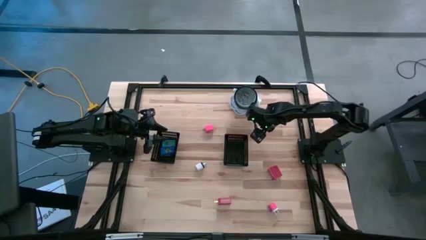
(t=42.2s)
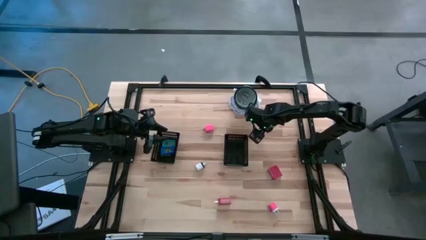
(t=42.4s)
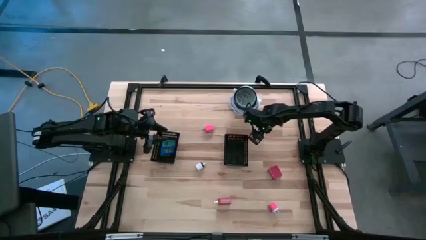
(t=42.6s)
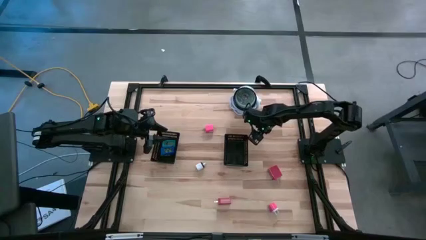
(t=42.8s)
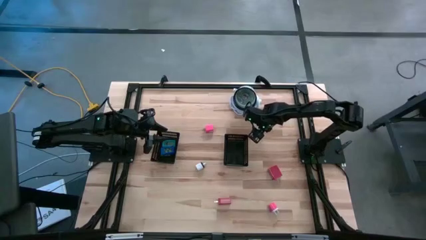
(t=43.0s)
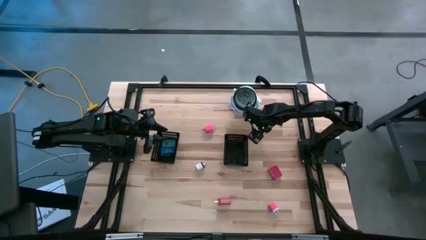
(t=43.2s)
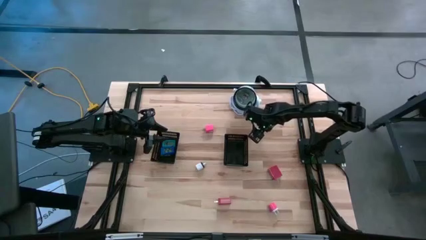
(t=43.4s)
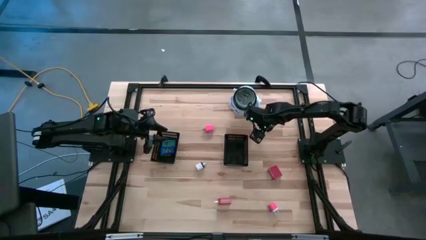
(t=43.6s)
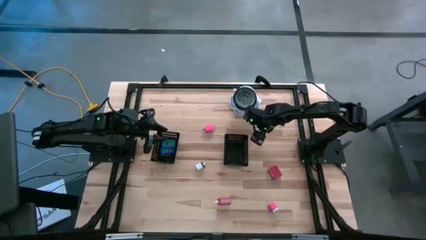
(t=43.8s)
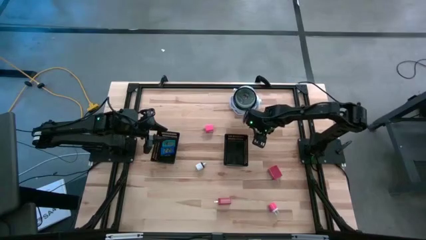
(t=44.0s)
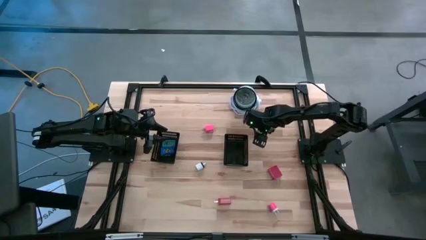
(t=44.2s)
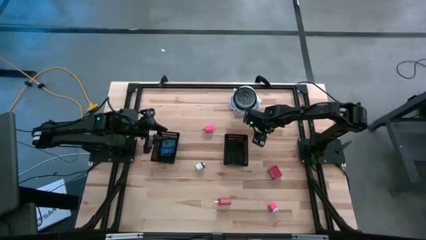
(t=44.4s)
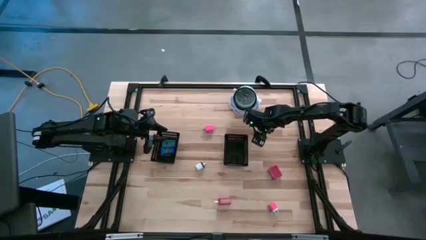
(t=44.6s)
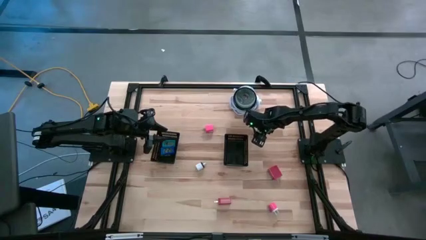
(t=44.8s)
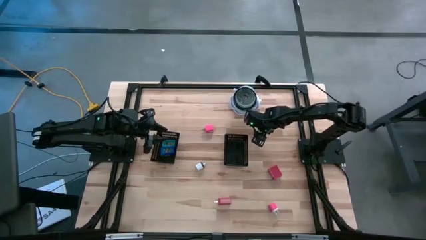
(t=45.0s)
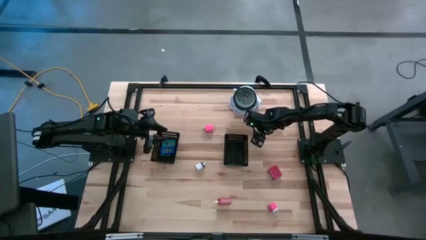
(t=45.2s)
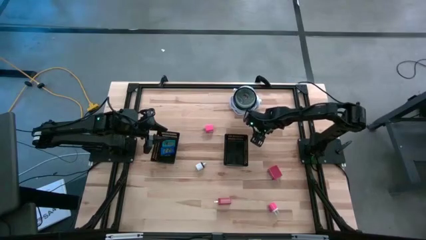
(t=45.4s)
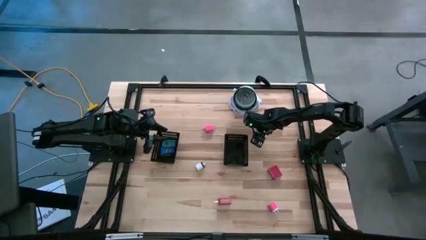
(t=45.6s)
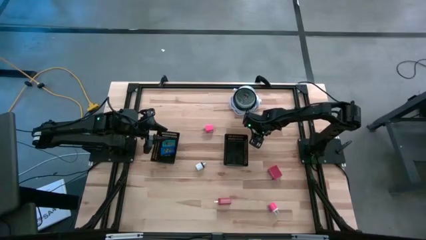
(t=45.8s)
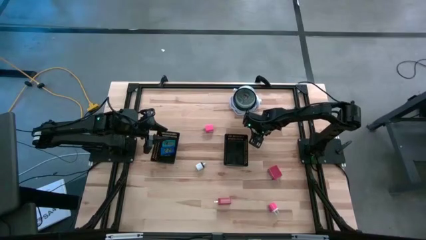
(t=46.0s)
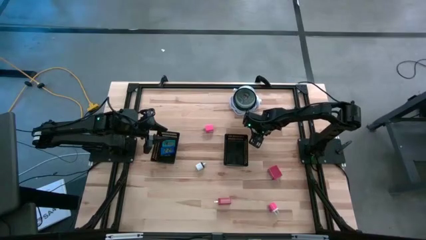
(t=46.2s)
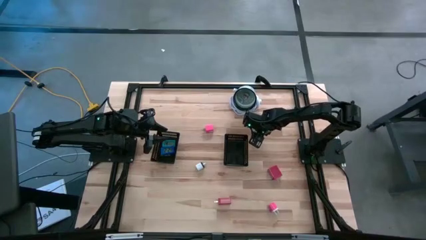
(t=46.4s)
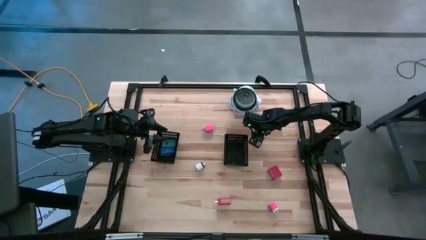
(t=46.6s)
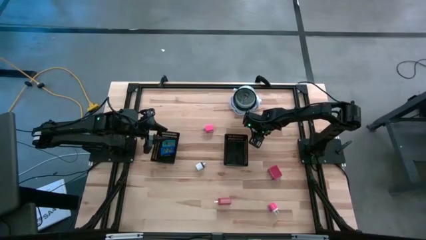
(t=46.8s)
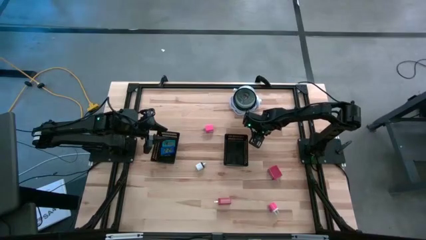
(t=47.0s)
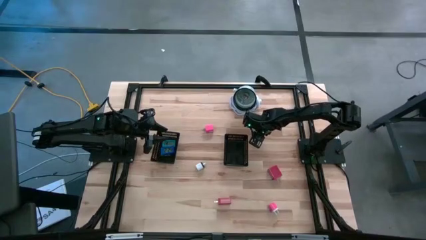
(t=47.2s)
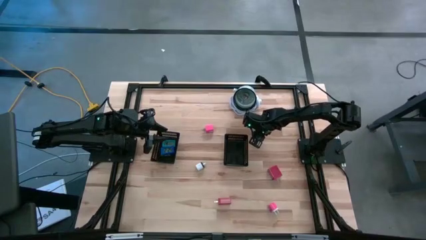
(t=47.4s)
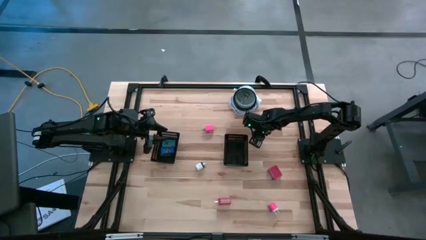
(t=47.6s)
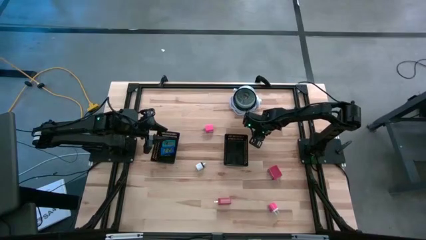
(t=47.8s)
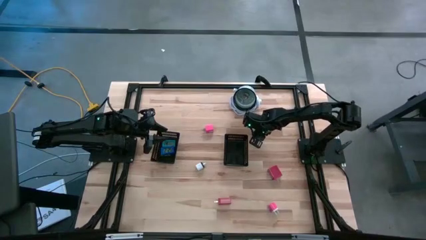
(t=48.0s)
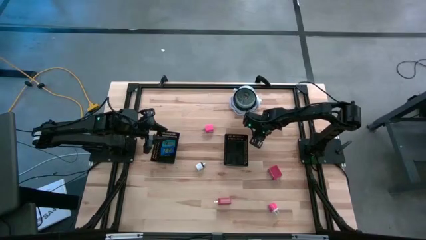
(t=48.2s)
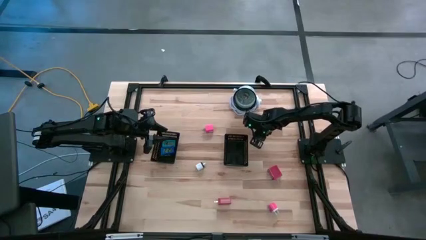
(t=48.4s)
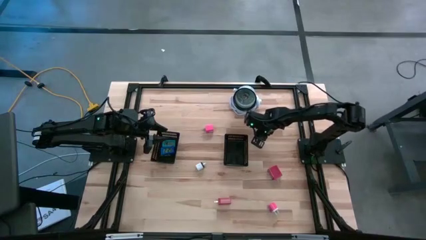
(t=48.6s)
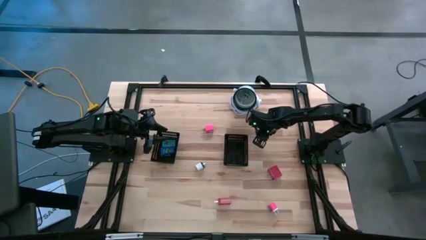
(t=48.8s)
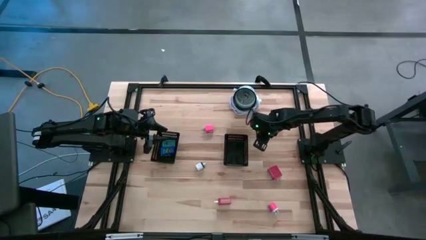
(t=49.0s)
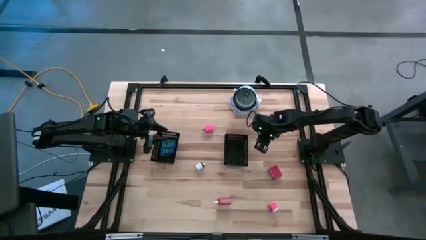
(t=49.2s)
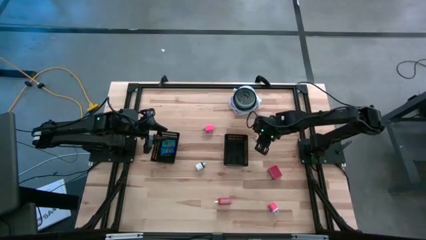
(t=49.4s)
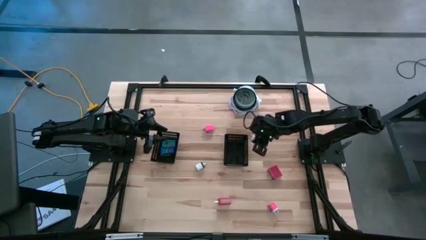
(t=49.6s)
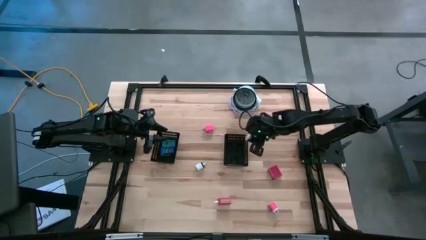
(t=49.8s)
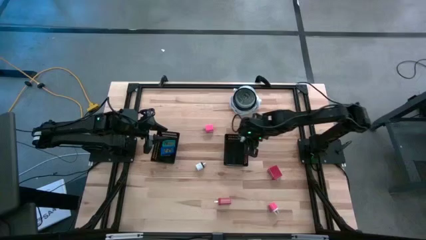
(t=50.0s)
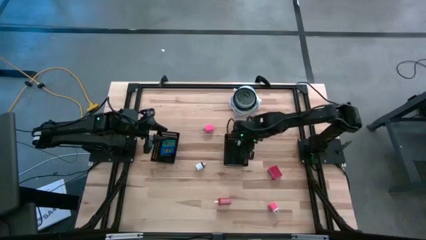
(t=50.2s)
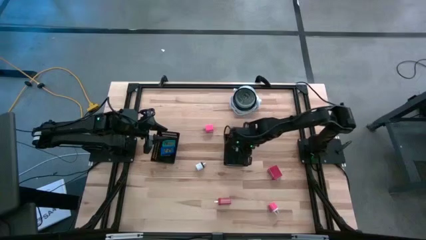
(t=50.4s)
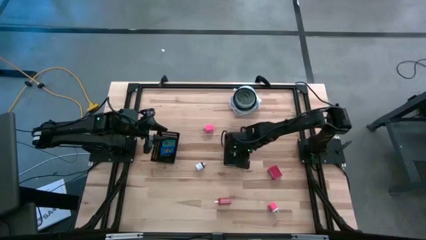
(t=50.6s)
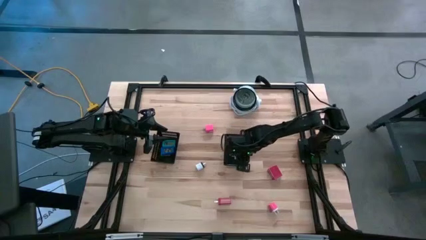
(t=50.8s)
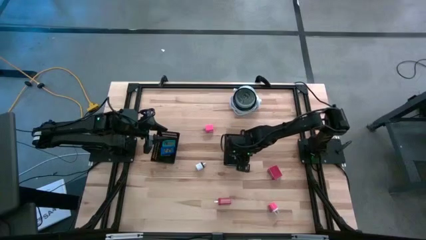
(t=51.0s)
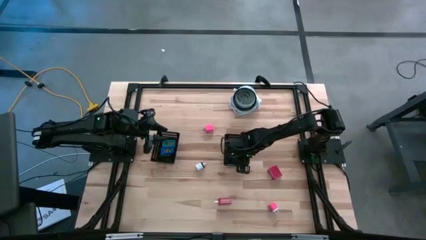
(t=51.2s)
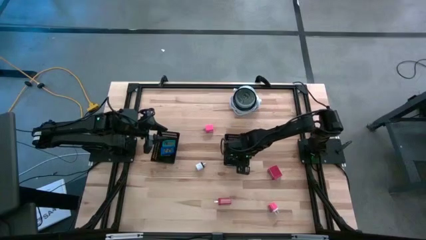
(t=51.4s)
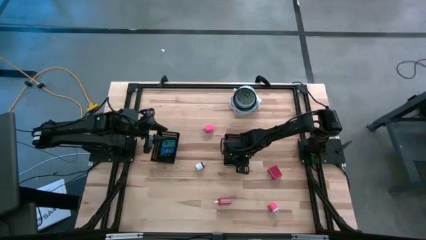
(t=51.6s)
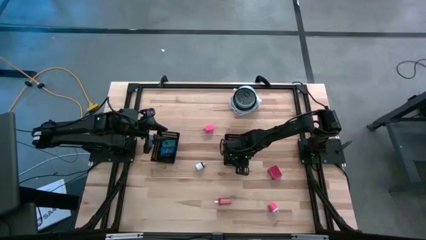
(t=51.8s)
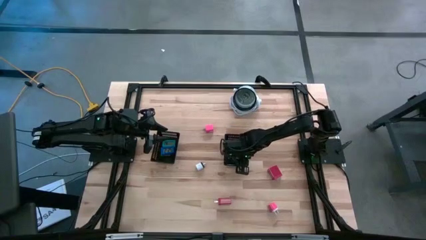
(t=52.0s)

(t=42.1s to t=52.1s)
Task: Pick & Place Office items
Put the green charger adapter into the right black bin

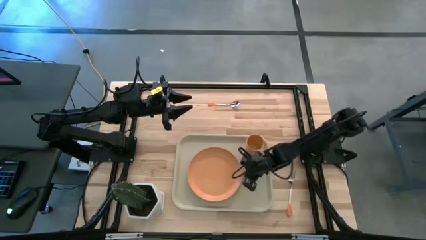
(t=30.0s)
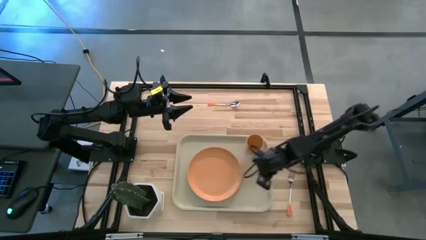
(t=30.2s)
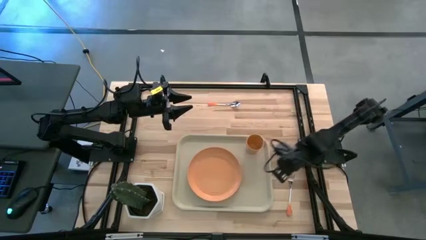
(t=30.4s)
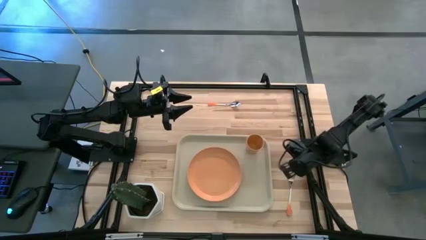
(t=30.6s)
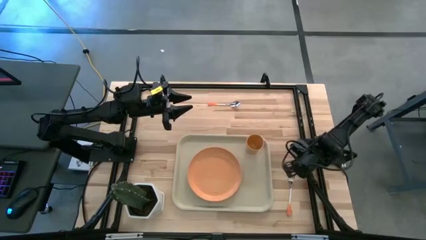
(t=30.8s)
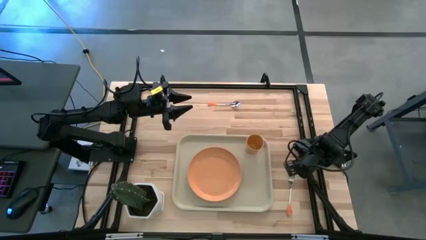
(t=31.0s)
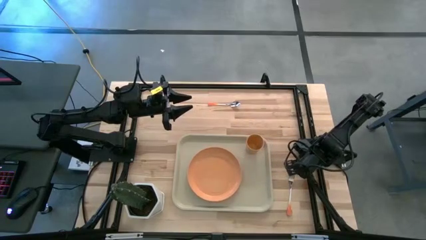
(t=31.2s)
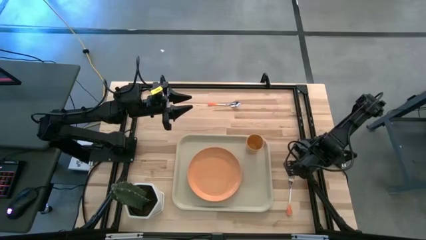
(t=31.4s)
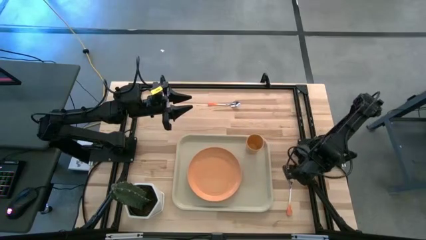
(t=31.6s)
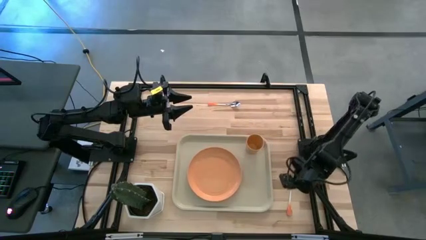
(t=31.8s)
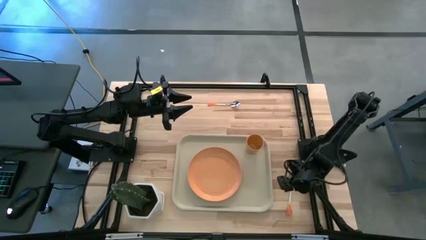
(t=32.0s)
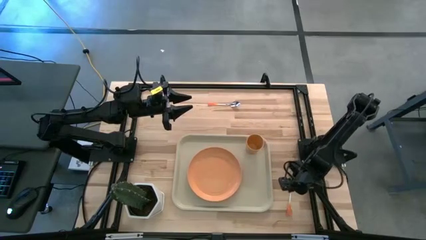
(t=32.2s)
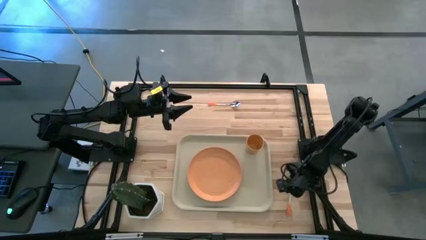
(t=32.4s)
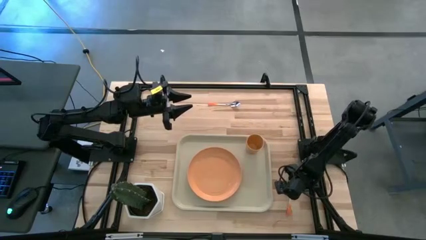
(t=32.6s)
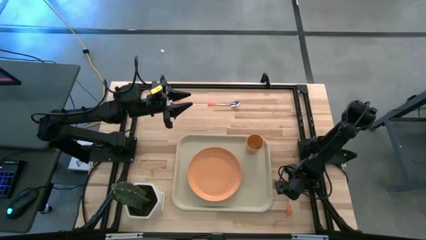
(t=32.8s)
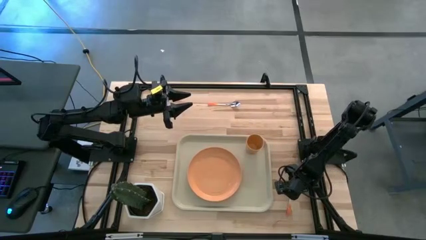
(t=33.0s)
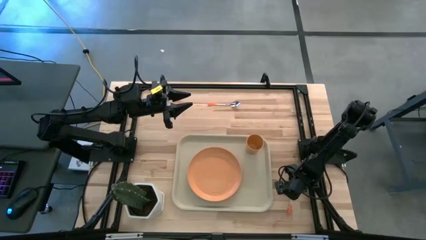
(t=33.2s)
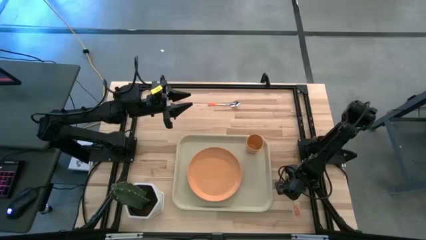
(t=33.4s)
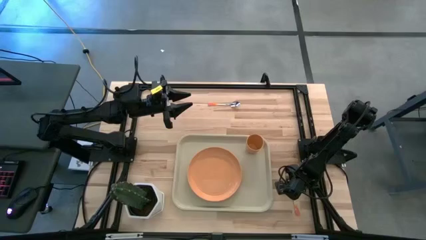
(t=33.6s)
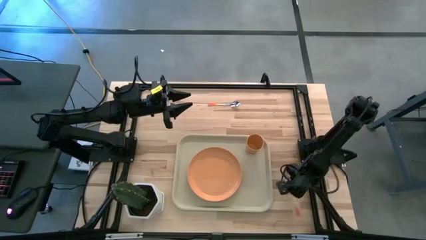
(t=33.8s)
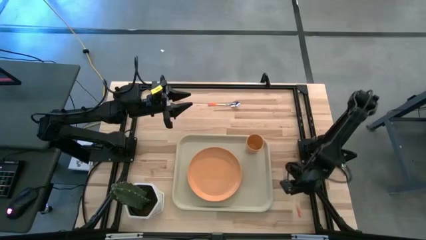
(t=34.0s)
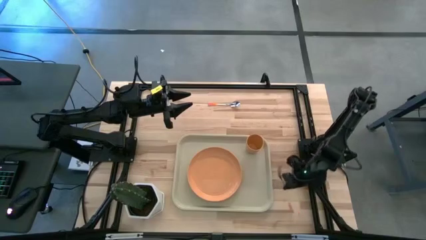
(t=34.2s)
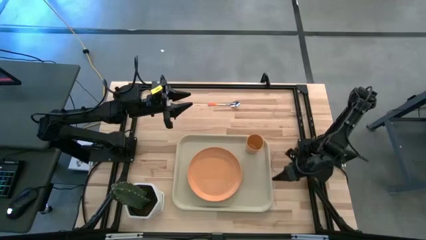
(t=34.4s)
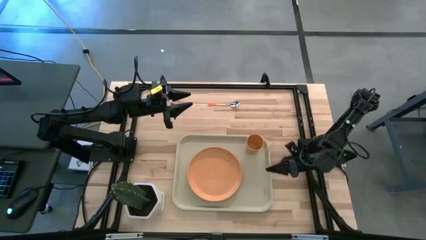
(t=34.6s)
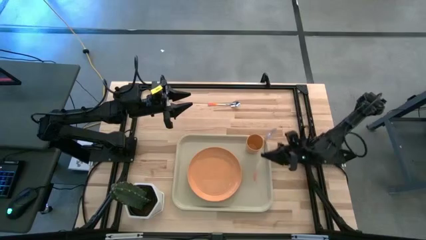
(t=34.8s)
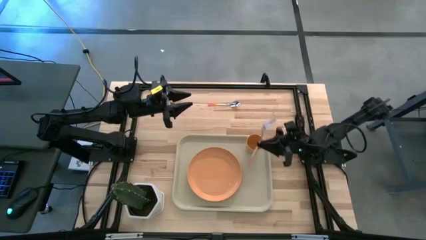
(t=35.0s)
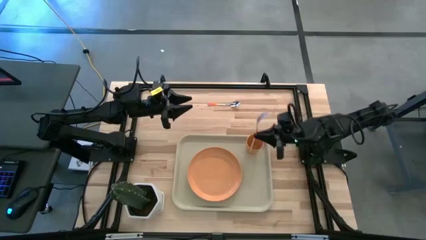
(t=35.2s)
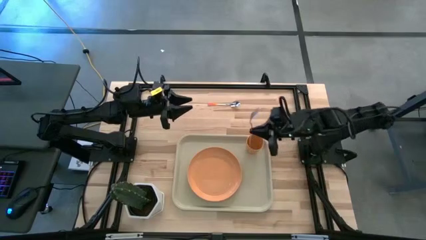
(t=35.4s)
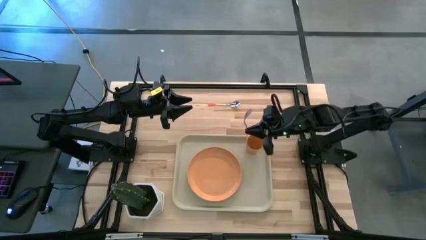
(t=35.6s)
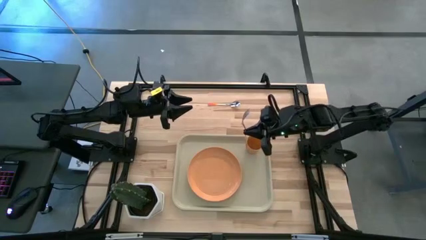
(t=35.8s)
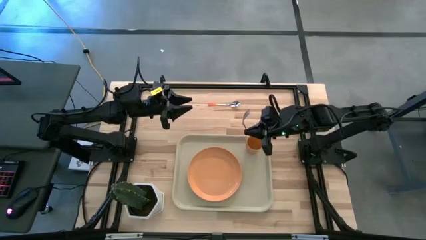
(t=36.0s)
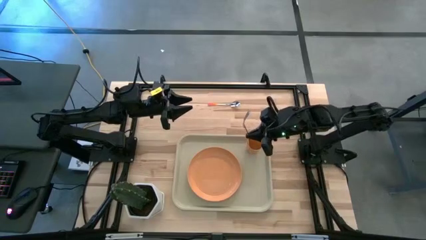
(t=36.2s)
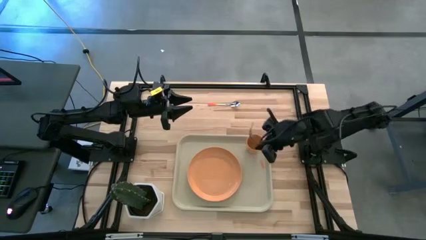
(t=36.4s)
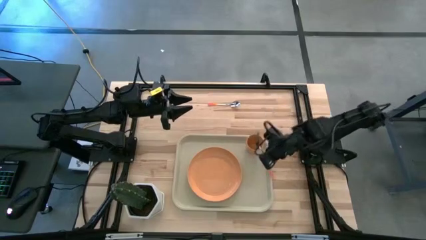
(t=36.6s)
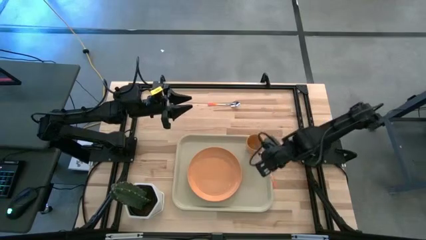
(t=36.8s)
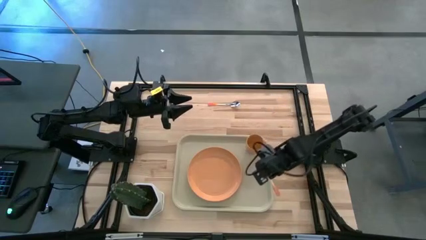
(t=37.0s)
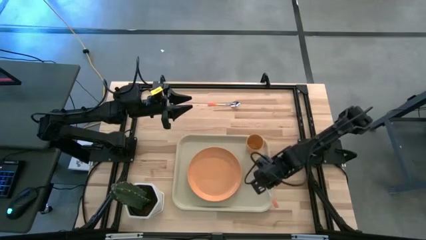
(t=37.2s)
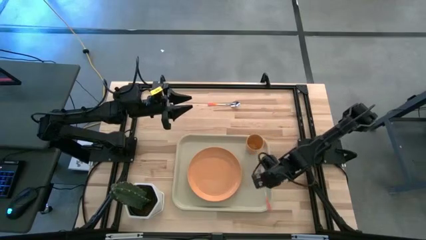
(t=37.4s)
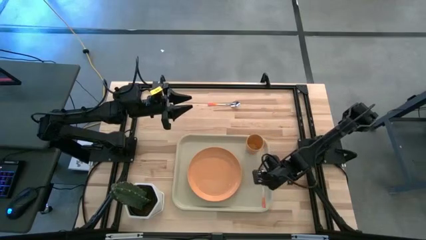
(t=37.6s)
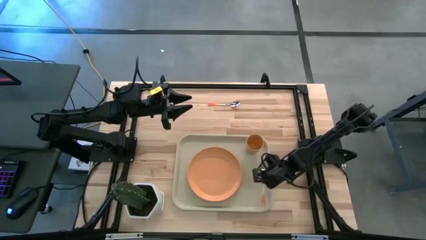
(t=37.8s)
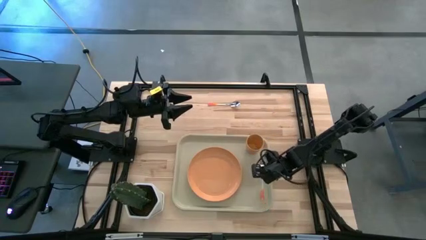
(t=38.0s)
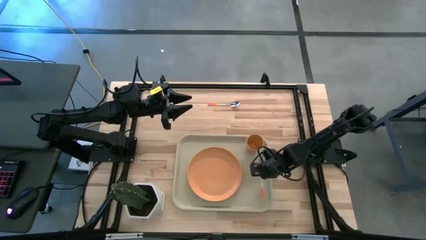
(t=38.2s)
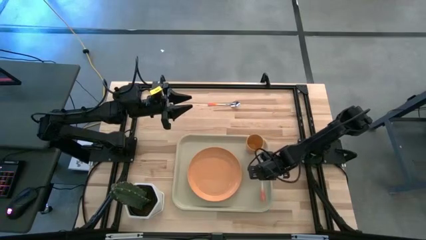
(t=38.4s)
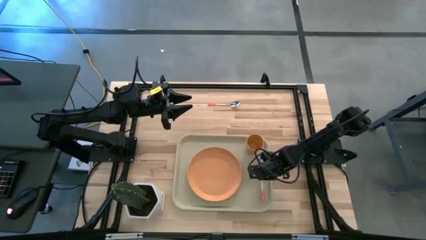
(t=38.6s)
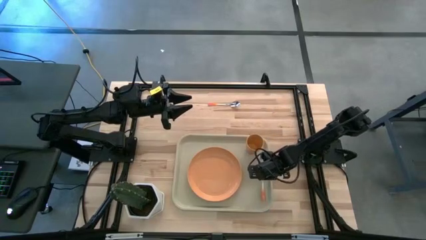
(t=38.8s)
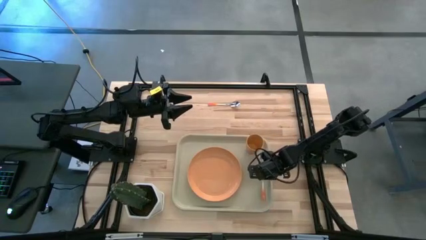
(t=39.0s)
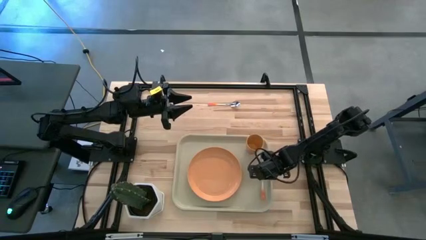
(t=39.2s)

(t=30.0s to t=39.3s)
Task: Pick and place plate/cup/fork/spoon on tray
Put the orange fork to the right of the orange plate on the gray tray
